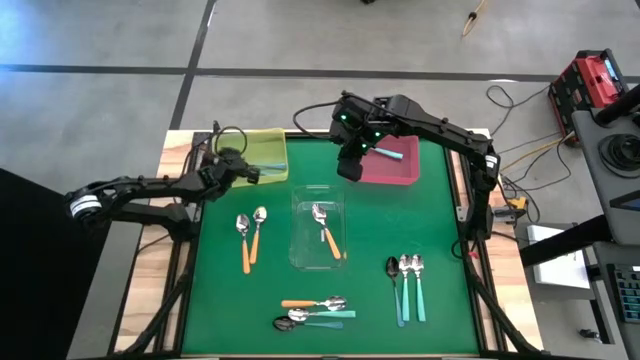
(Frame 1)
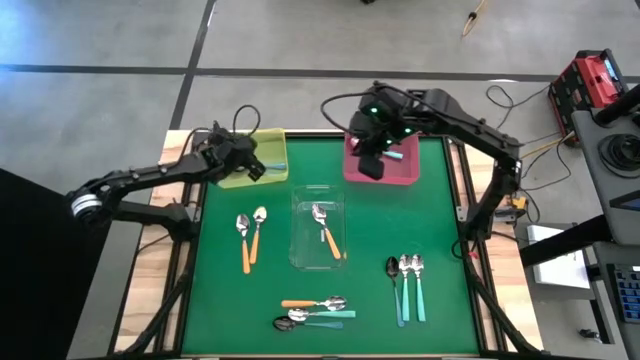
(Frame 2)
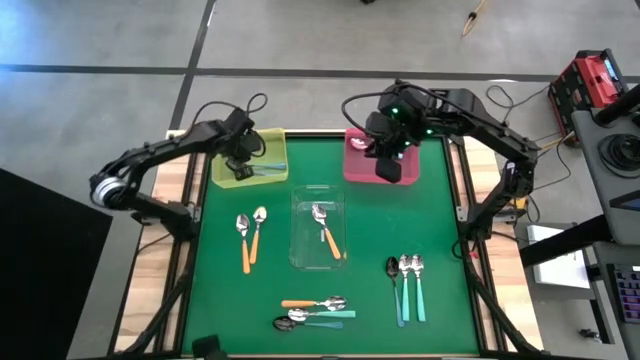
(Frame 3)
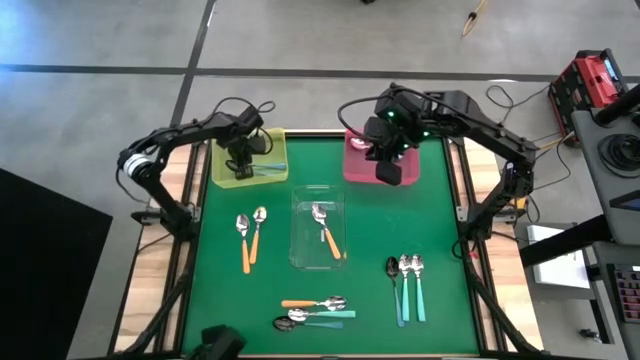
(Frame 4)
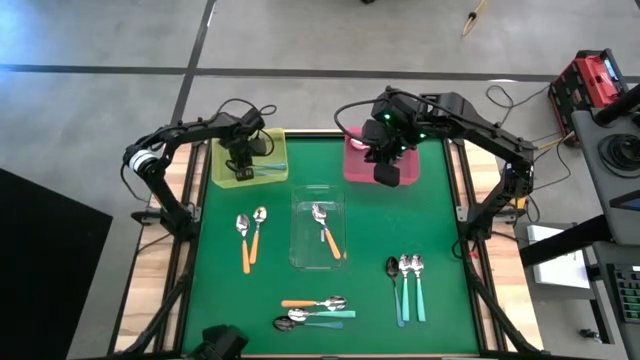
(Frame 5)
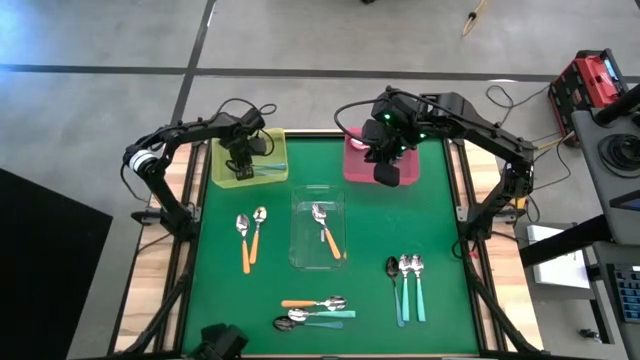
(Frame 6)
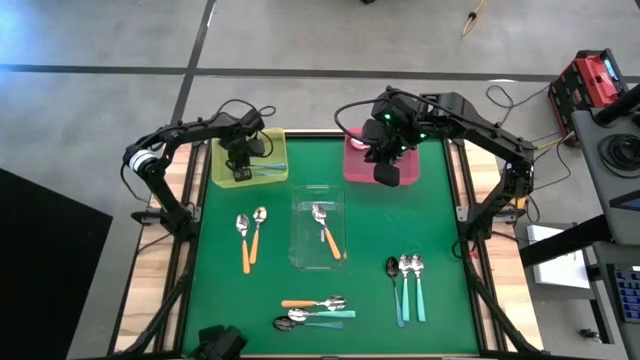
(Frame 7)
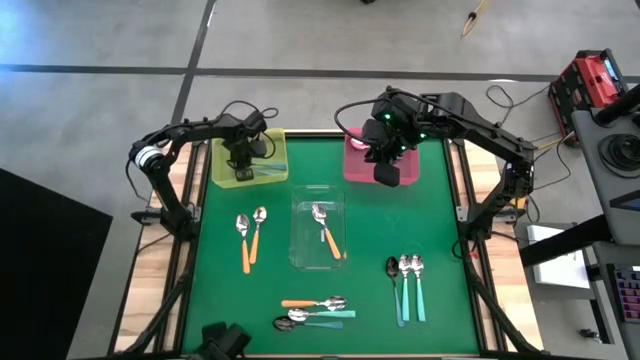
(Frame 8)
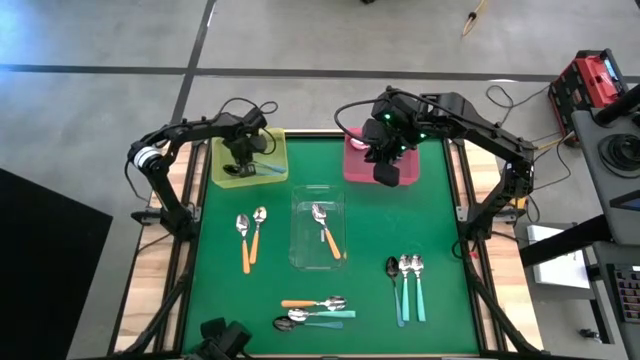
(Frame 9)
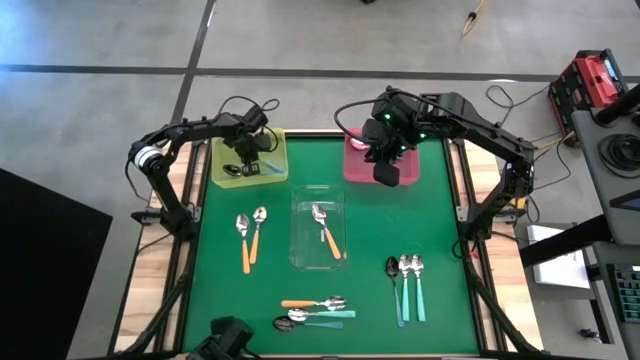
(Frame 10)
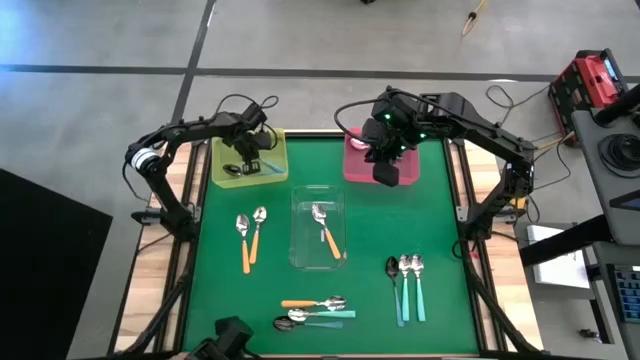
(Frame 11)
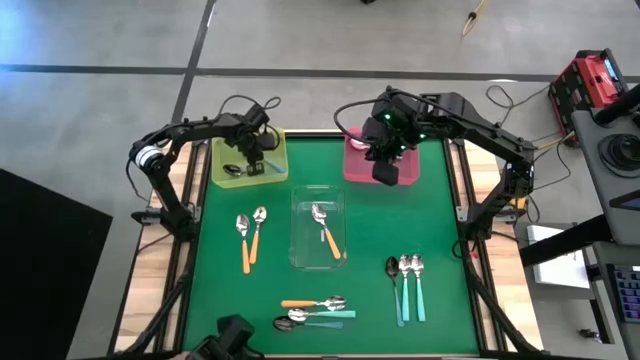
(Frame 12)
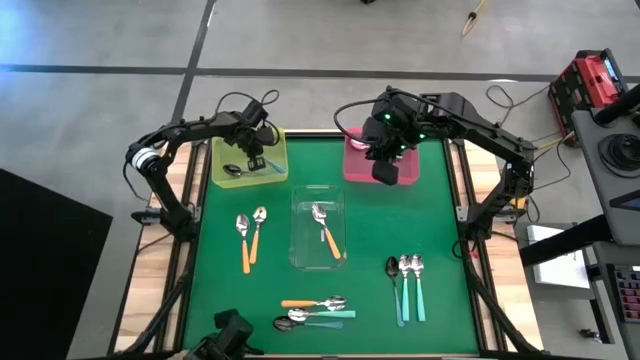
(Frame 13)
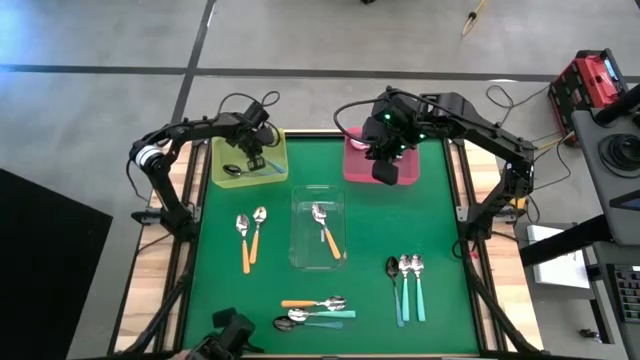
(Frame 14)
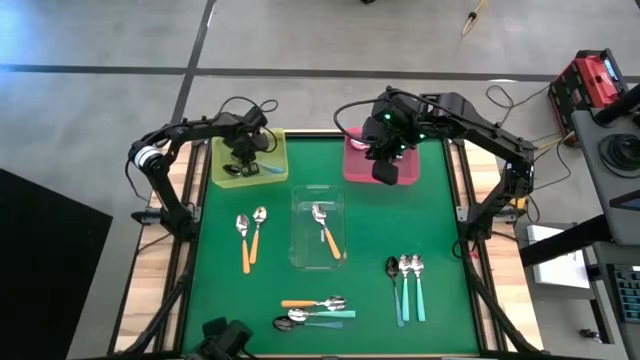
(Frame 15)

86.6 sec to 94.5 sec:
Task: Sort silverware by color (type)
Adjust the blue spoon

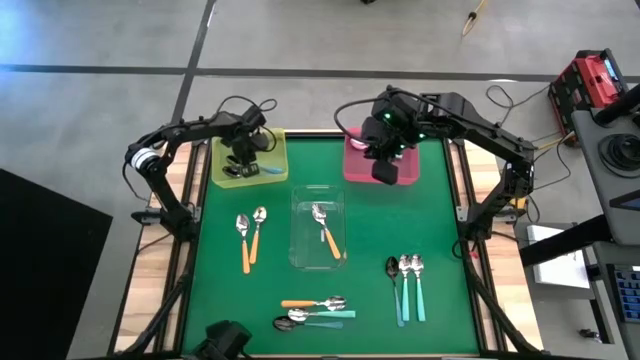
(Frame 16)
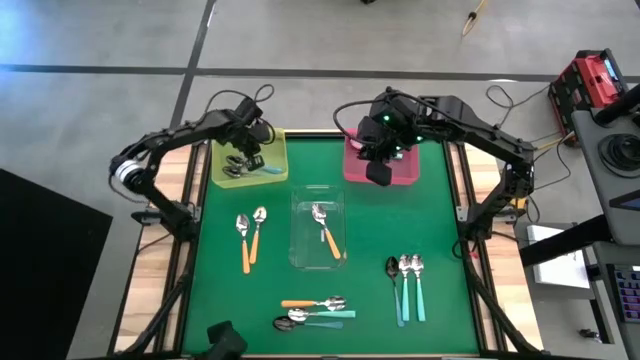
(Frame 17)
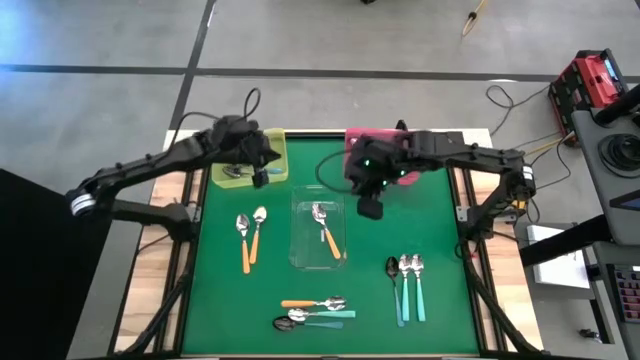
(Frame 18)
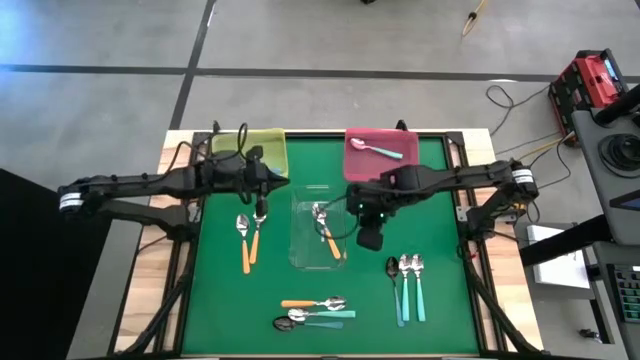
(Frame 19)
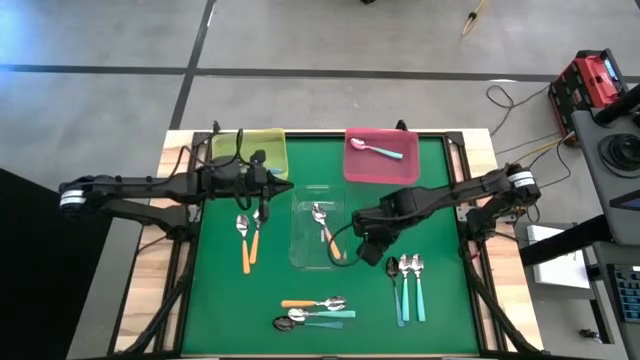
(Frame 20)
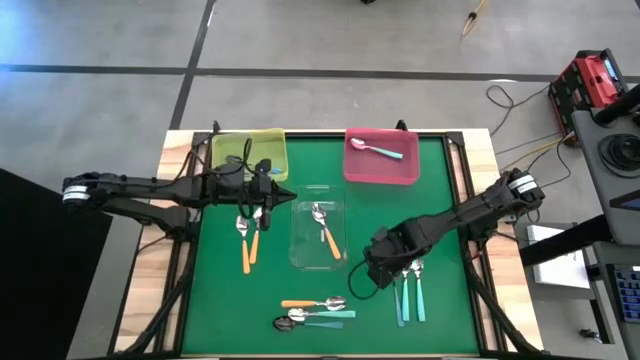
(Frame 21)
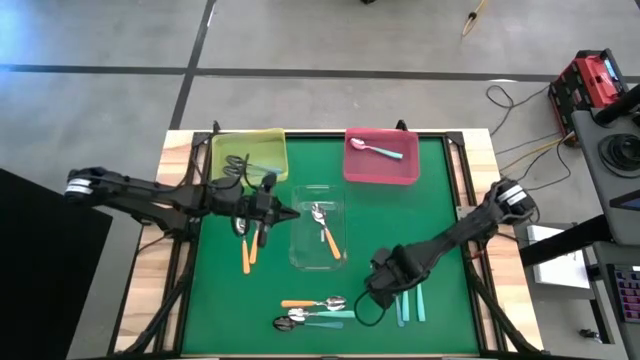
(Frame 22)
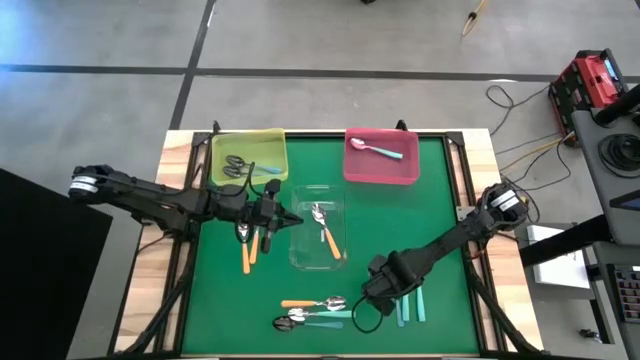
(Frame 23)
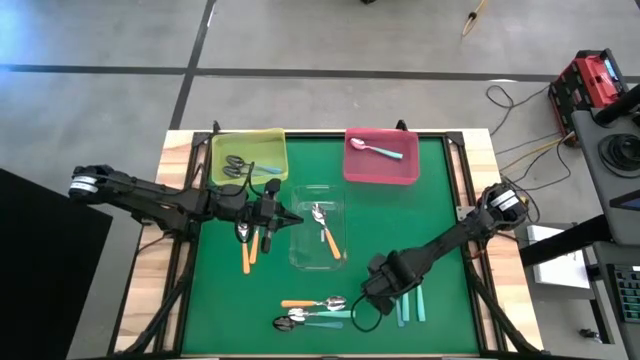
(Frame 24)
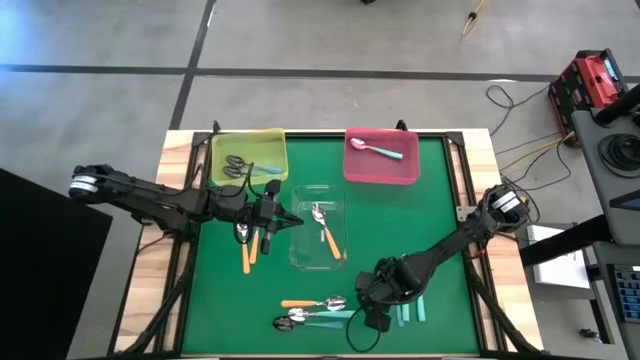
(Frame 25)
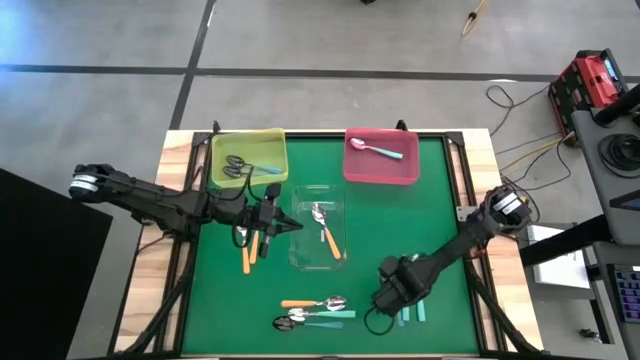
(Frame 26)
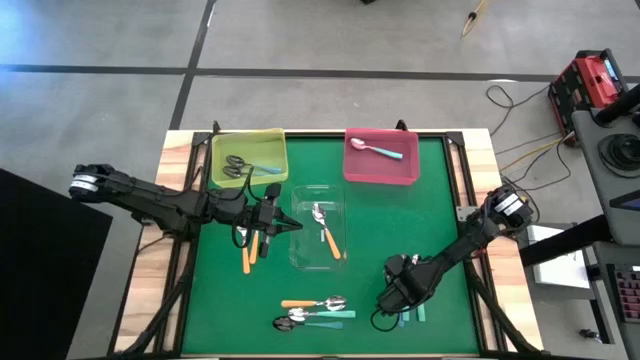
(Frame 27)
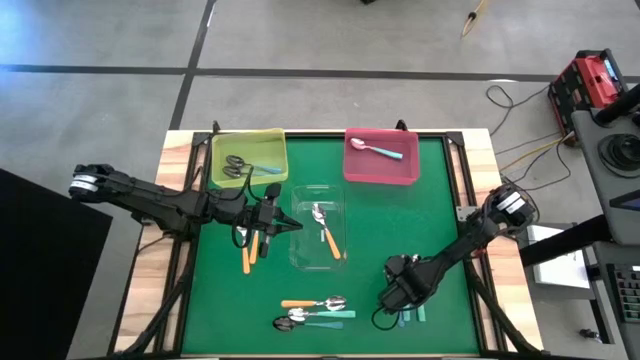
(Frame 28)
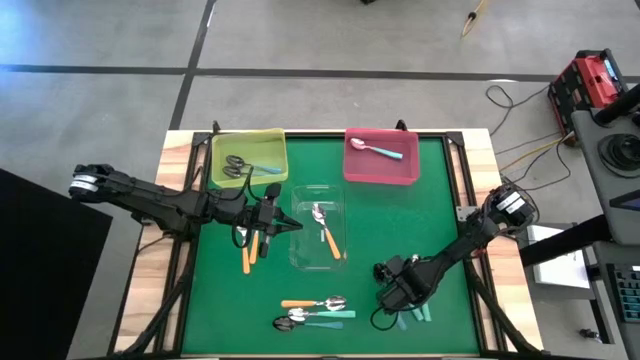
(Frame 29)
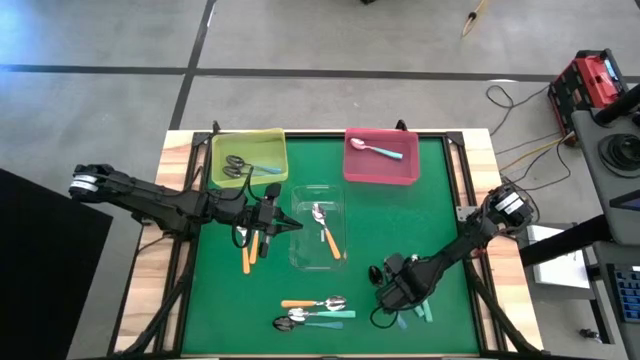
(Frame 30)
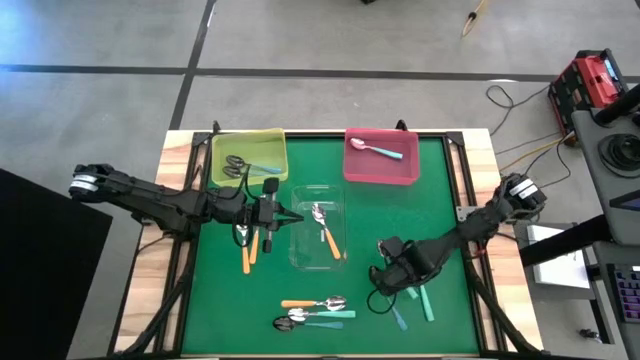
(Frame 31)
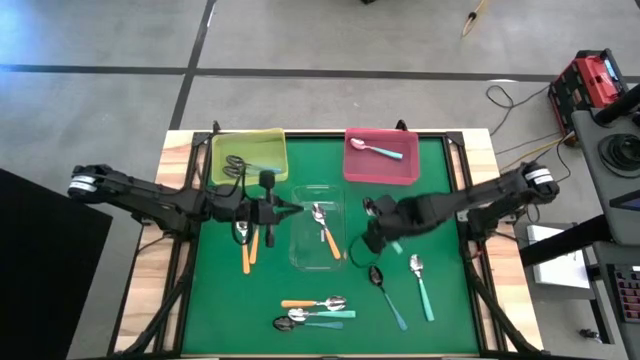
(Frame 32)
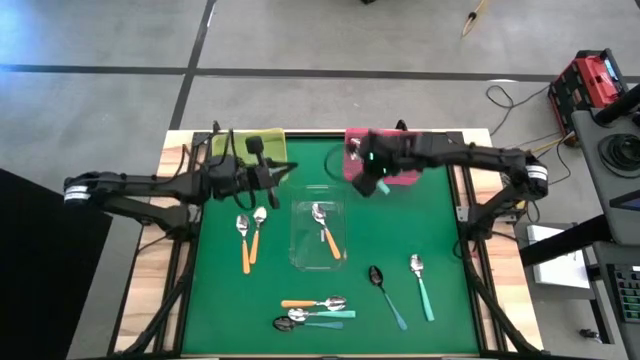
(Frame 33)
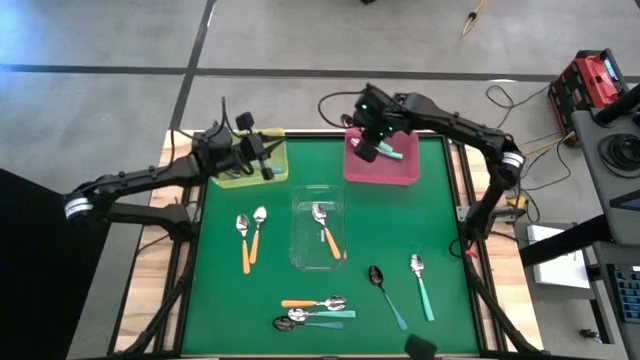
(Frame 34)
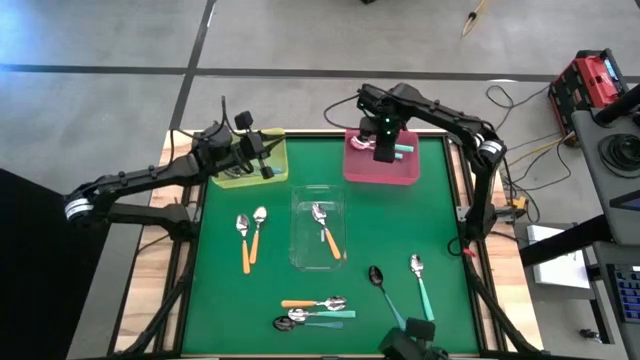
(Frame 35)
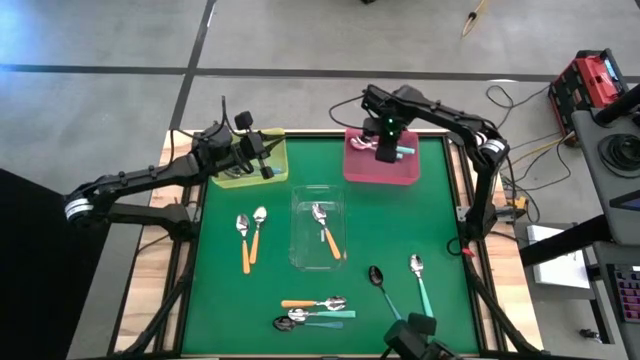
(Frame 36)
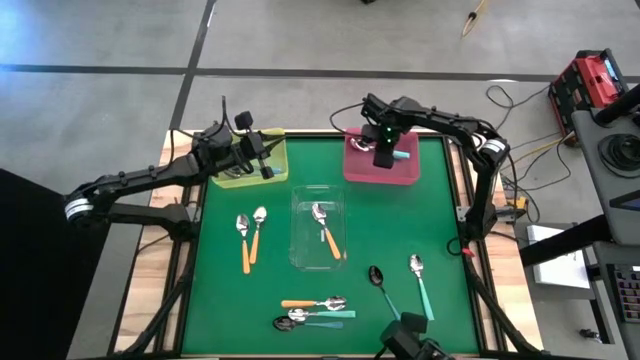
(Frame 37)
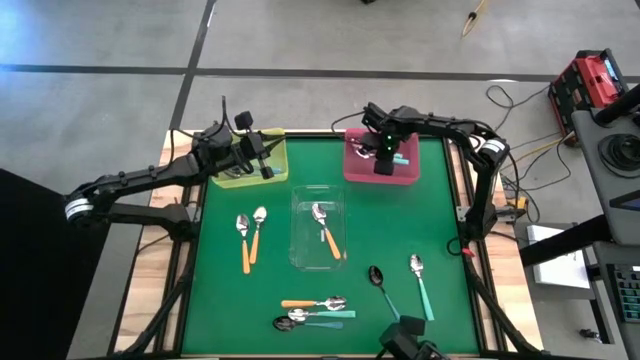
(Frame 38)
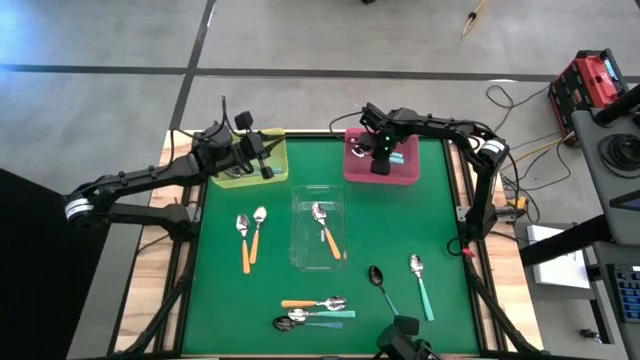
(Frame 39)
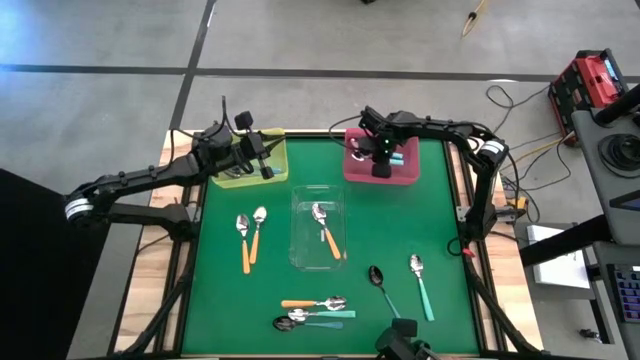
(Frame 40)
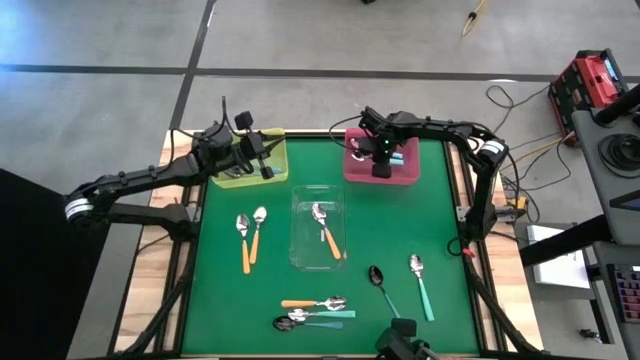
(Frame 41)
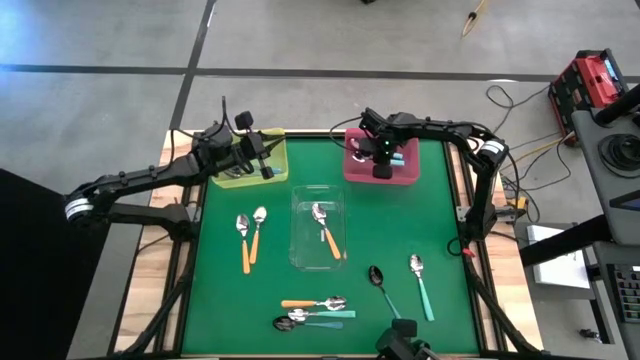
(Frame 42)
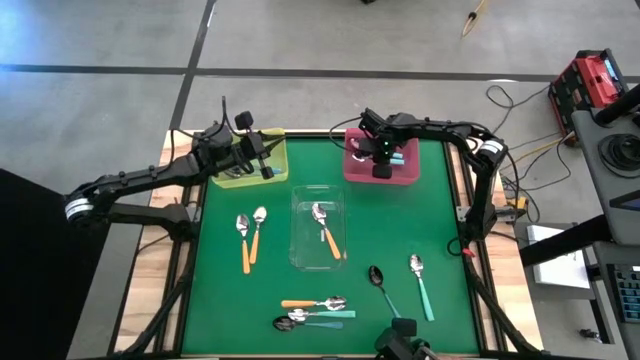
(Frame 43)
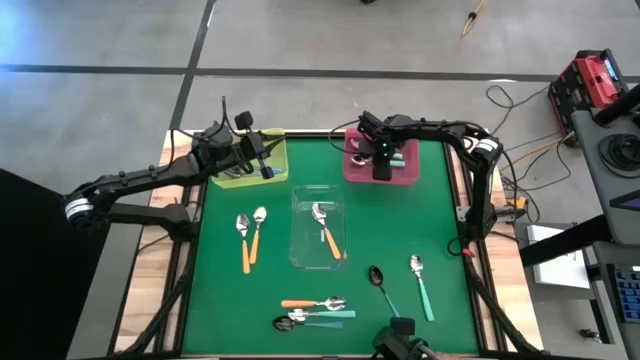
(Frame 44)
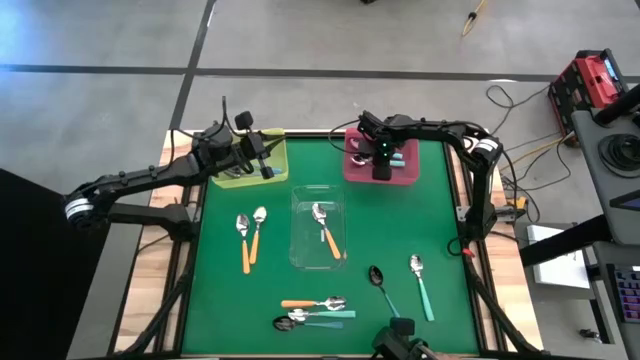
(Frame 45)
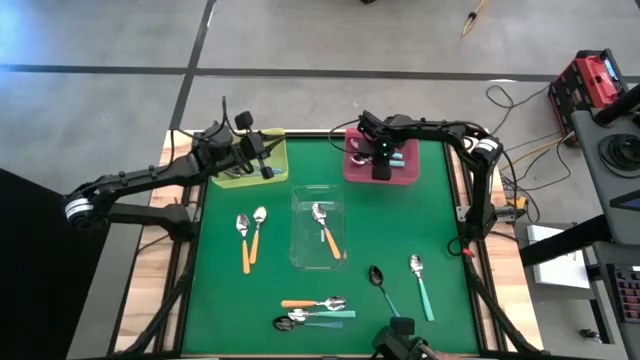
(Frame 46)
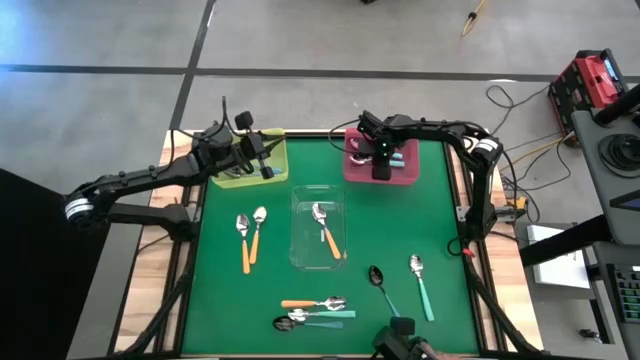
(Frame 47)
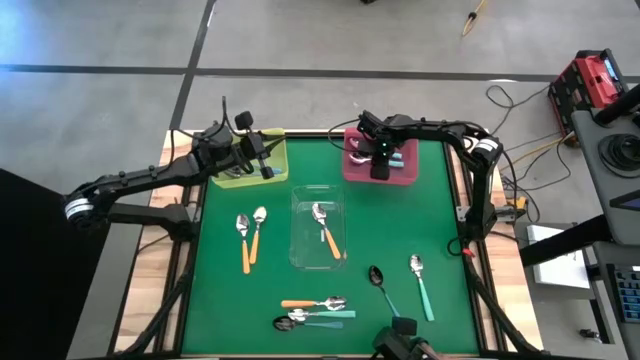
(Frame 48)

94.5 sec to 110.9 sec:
Put the right light blue spoon into the pink bin
